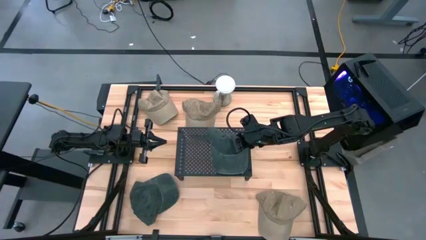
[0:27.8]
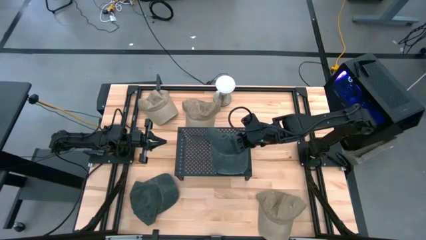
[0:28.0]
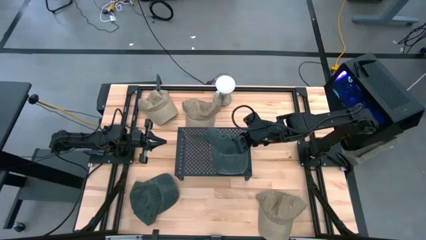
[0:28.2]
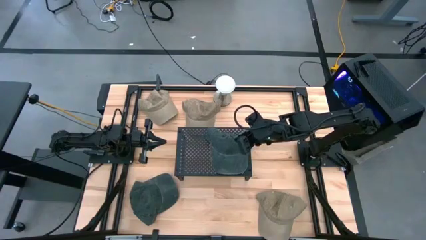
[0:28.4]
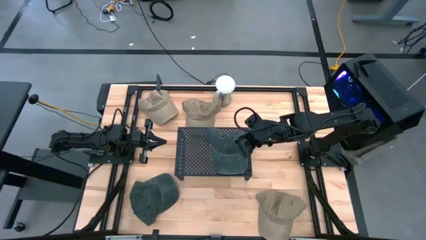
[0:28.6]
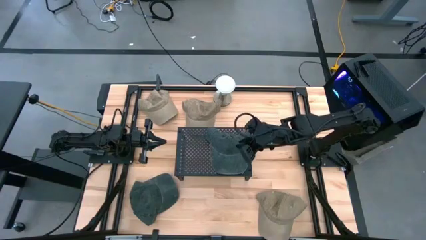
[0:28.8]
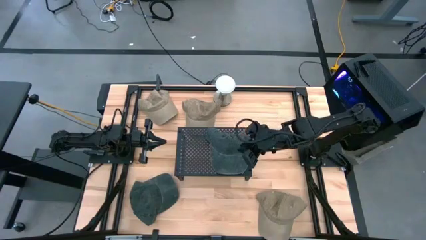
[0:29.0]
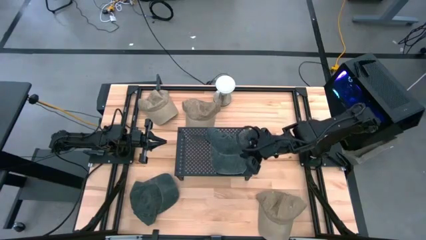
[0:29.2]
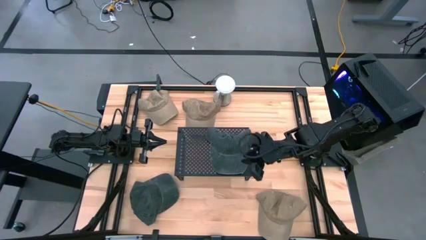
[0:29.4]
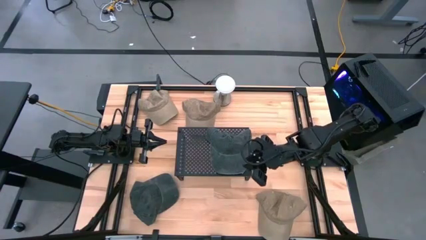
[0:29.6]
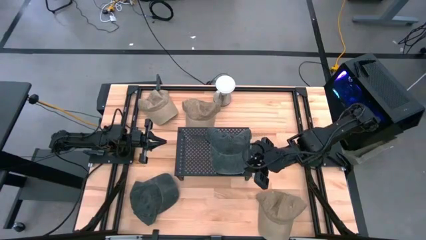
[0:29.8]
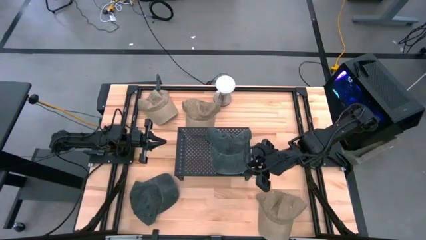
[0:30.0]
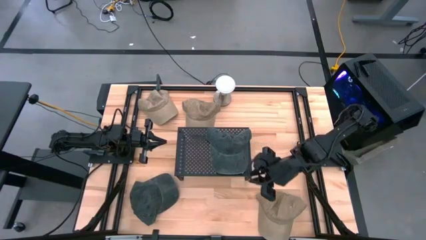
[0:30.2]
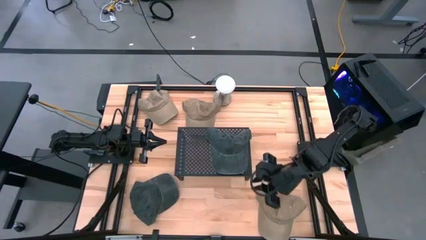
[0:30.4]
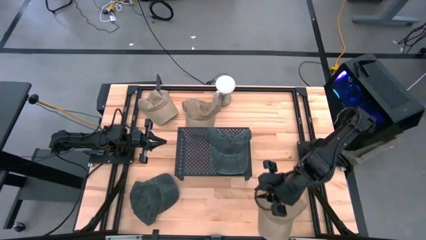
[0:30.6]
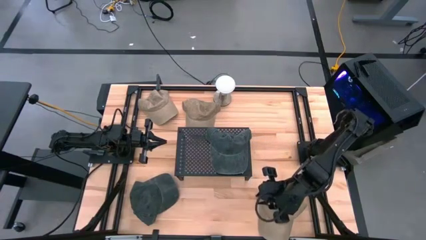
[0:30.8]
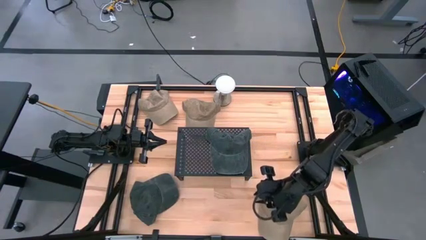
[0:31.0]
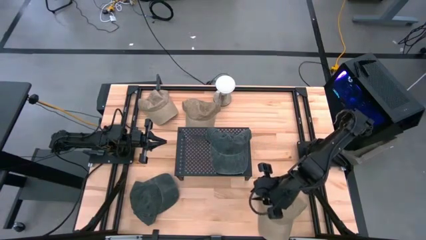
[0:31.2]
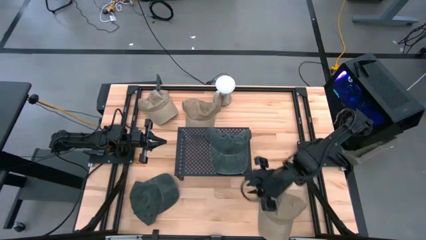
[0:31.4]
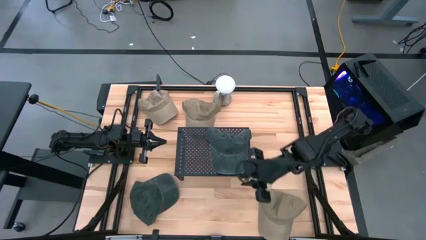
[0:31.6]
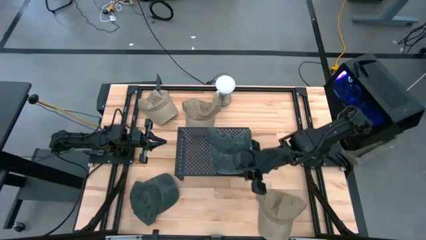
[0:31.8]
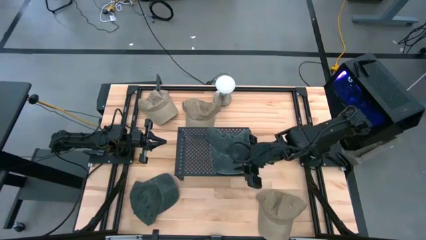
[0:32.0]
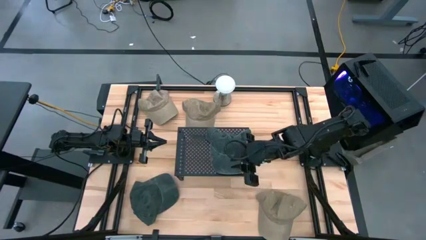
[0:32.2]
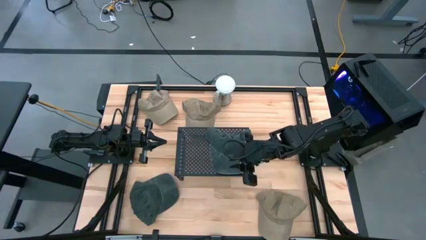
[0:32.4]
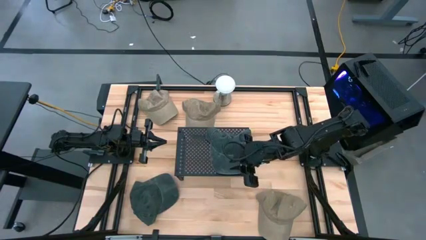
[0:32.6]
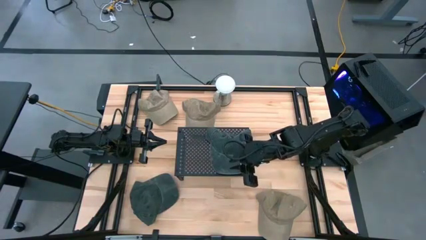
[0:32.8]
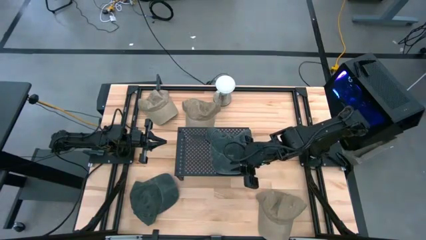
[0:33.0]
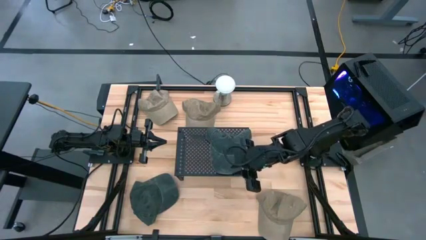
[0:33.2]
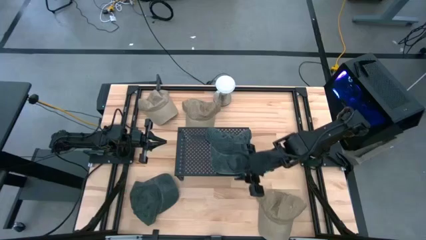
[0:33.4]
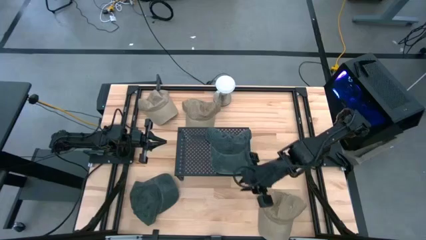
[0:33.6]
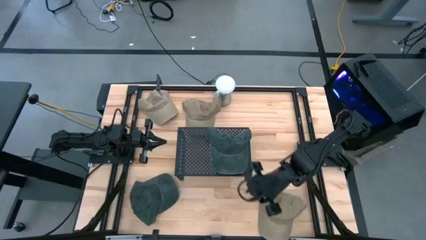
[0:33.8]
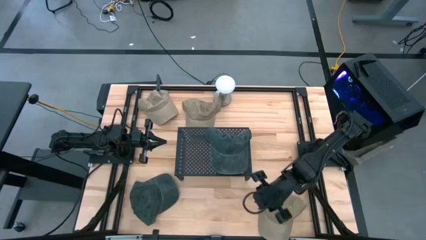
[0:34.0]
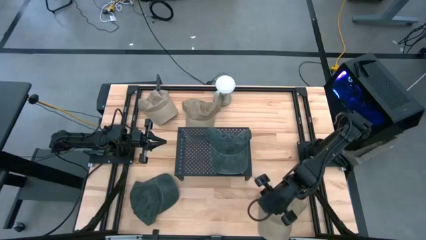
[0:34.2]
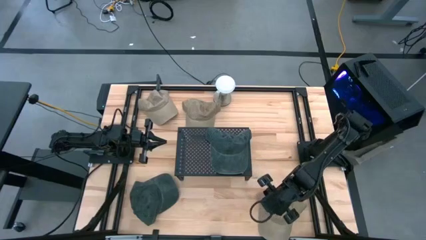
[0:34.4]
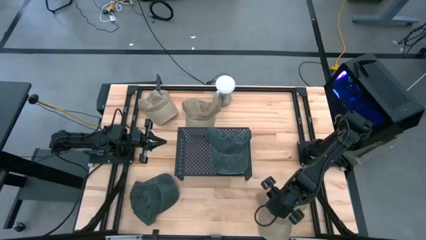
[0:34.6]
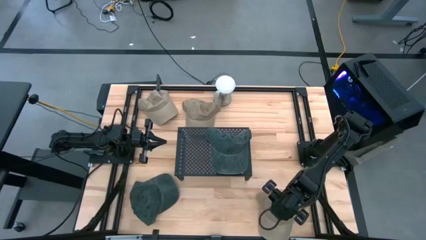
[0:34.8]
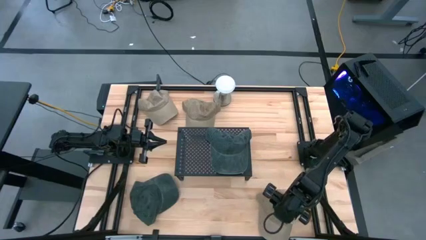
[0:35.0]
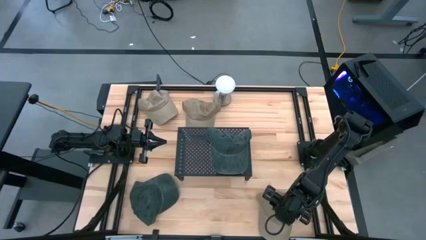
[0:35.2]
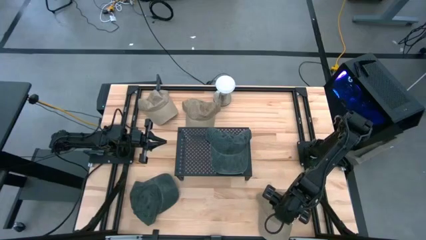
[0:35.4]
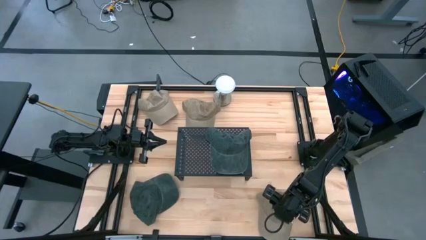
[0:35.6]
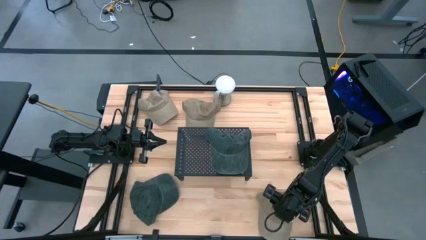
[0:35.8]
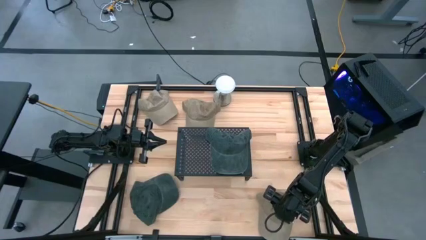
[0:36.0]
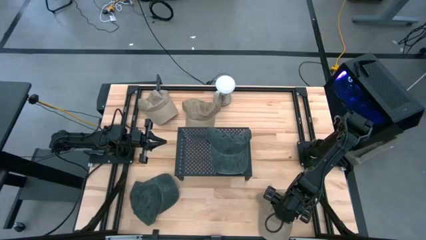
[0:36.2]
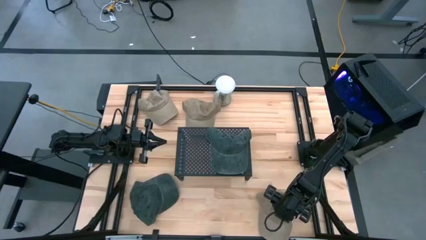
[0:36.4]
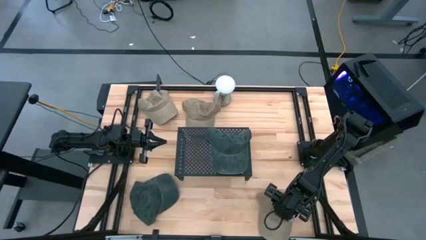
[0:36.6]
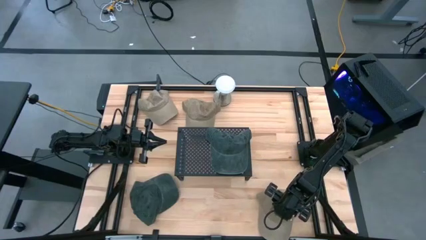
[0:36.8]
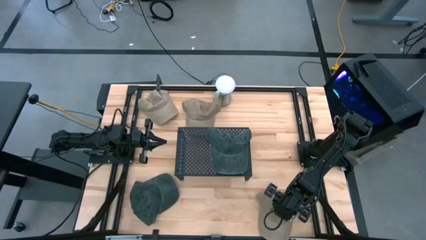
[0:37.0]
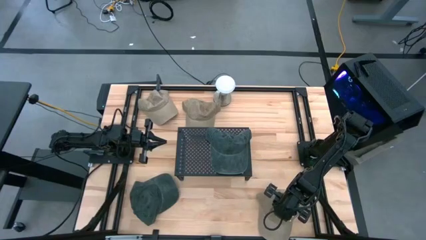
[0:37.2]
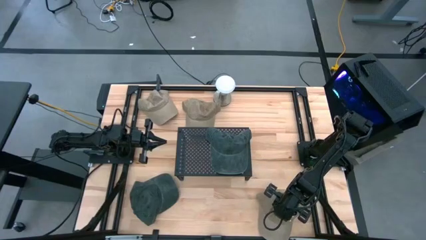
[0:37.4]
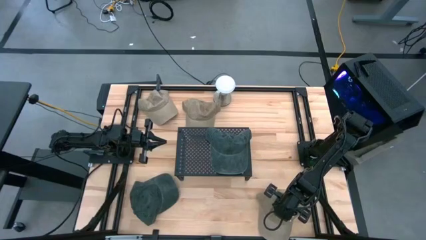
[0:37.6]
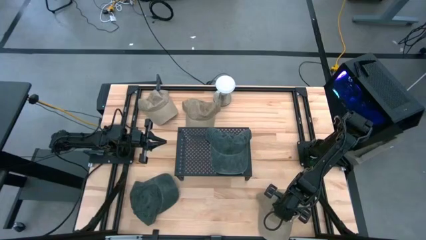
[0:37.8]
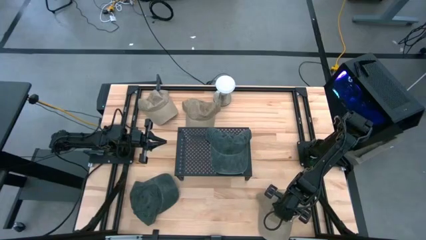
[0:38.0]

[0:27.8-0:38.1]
Task: Pick & Place hat
Put the bottom brown cap on the shelf
